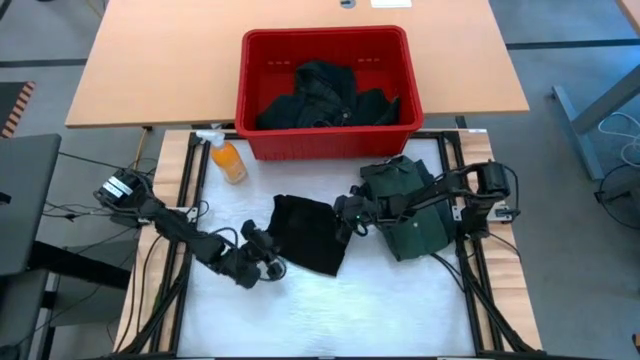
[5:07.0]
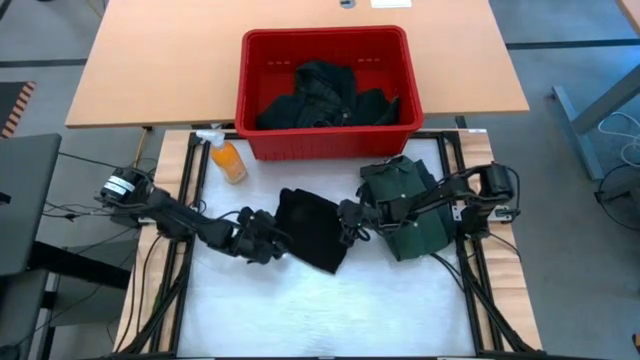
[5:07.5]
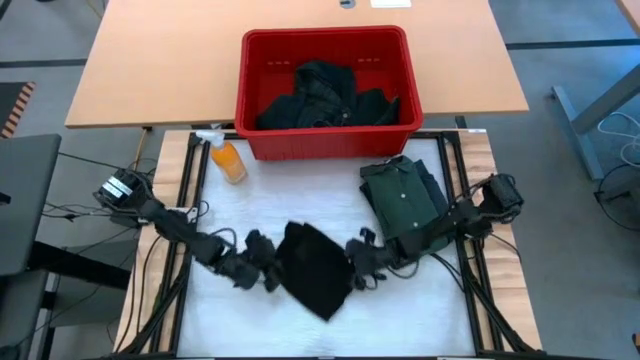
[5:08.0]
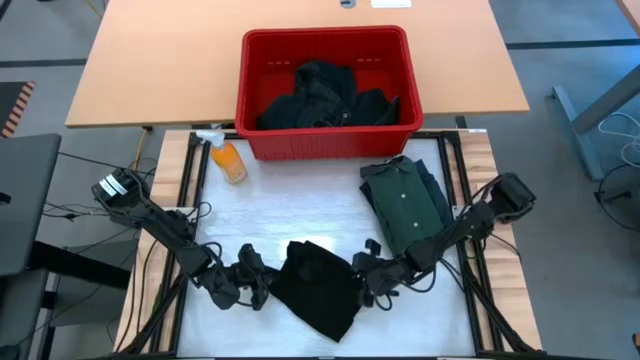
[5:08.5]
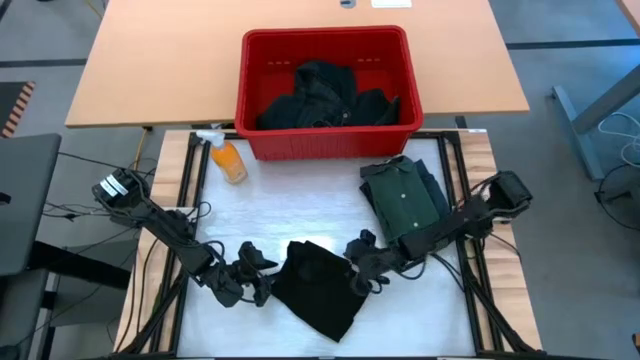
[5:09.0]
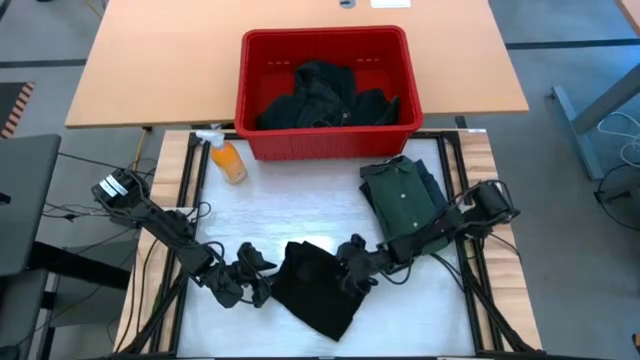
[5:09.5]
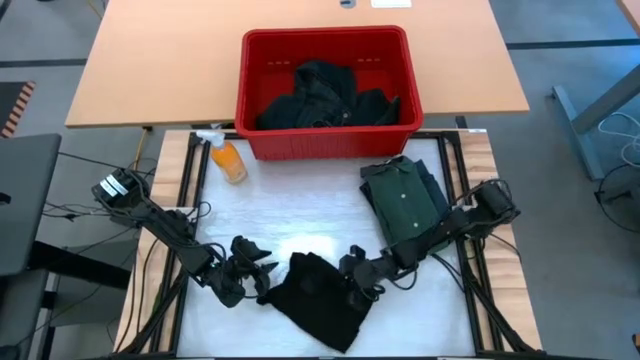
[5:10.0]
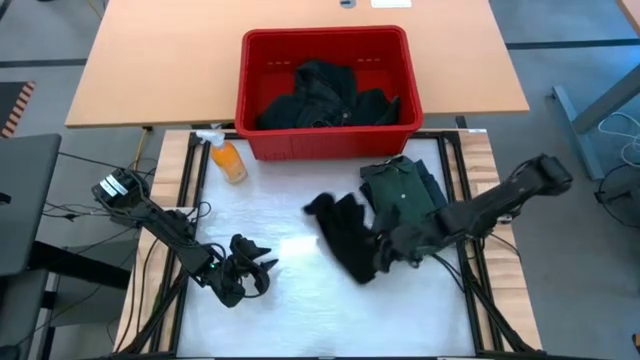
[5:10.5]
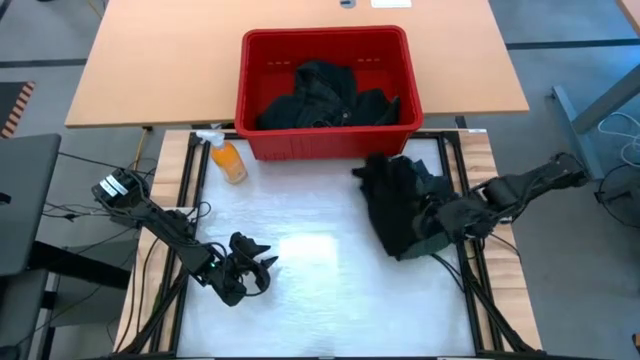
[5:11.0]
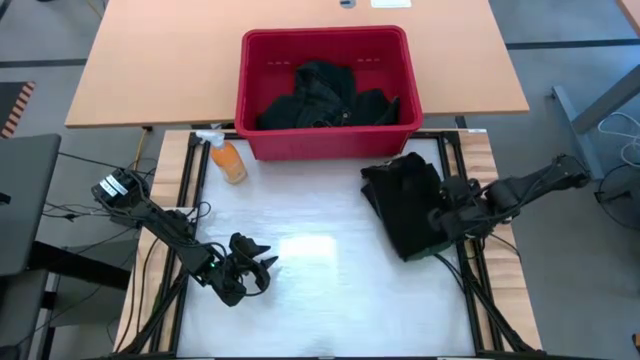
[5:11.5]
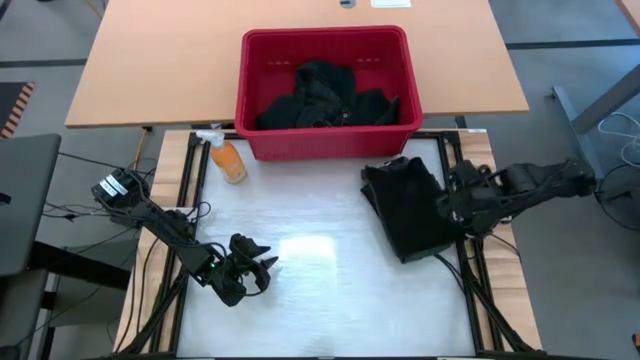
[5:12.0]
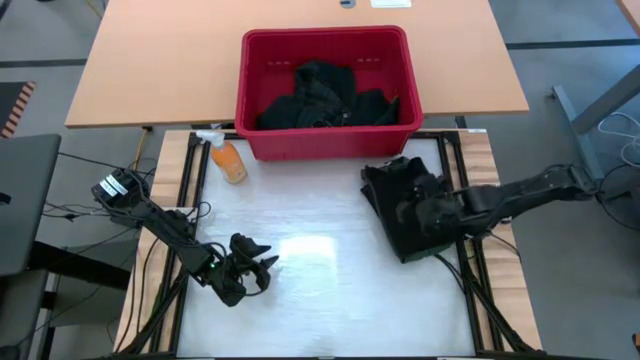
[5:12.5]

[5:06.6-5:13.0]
Task: Fold laundry
Stack the folded black shirt on top of the folded dark green shirt

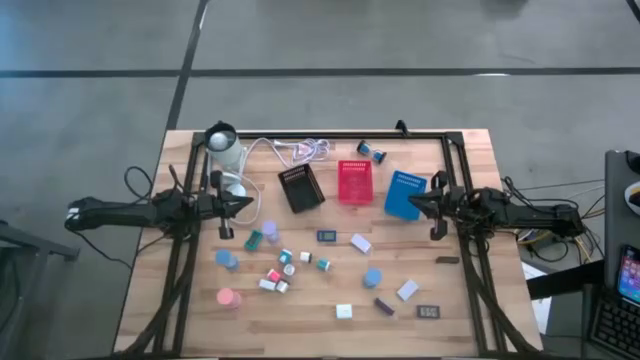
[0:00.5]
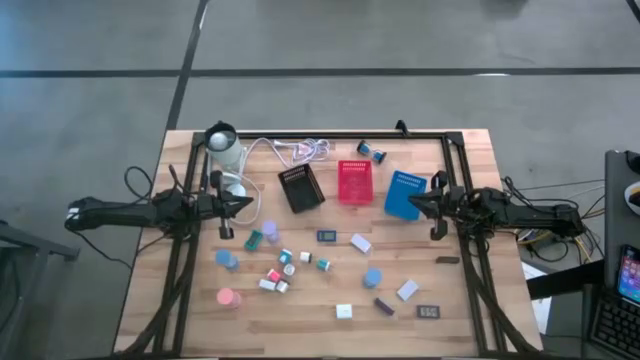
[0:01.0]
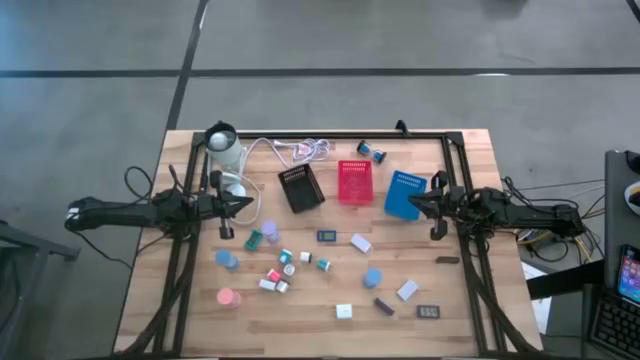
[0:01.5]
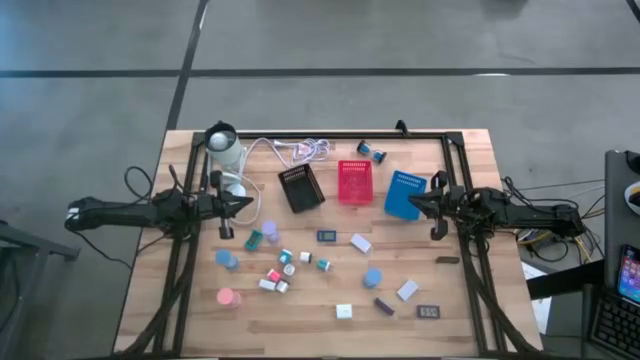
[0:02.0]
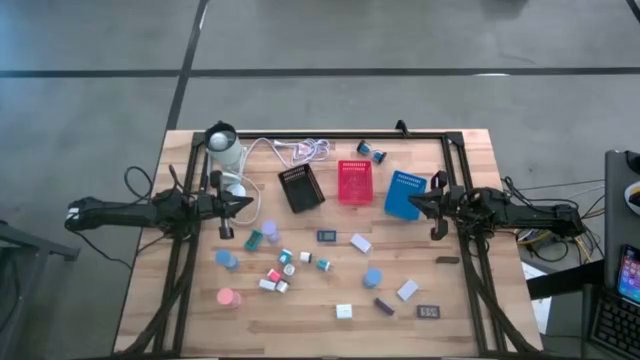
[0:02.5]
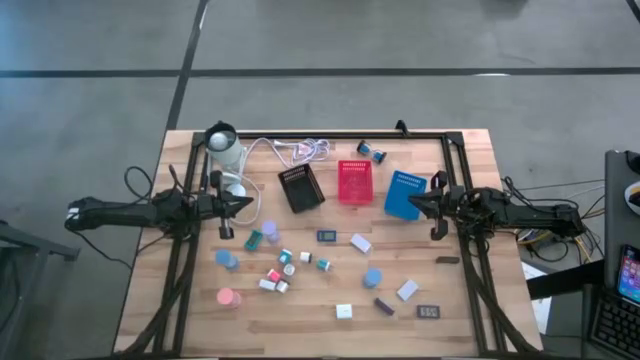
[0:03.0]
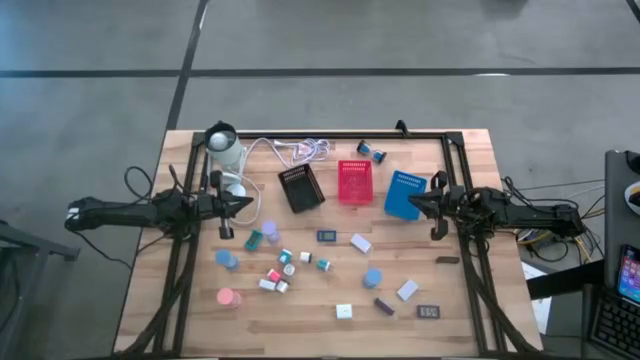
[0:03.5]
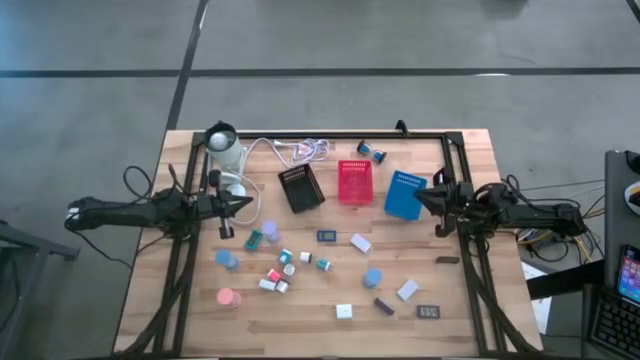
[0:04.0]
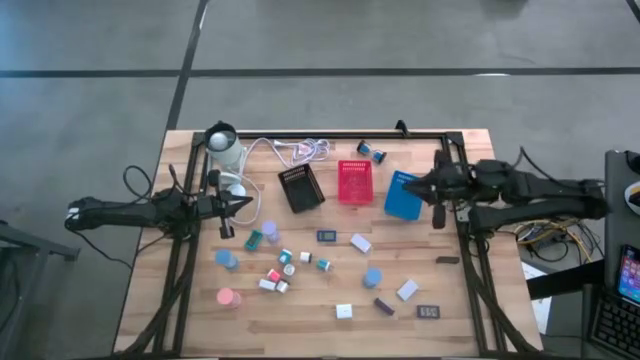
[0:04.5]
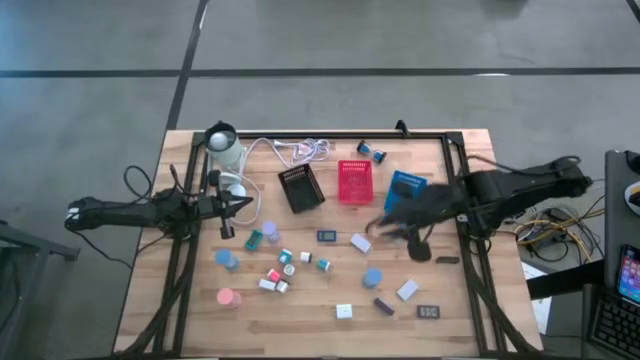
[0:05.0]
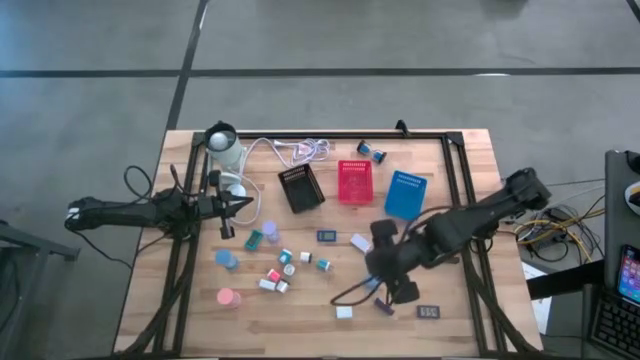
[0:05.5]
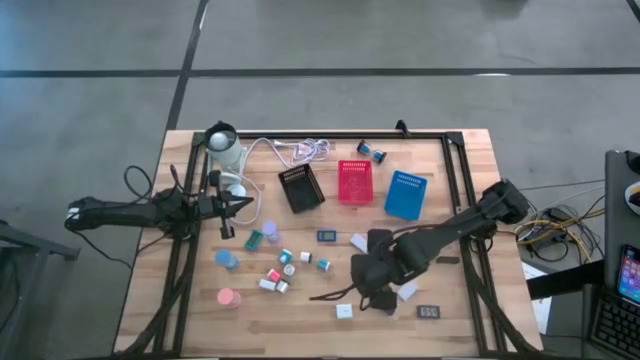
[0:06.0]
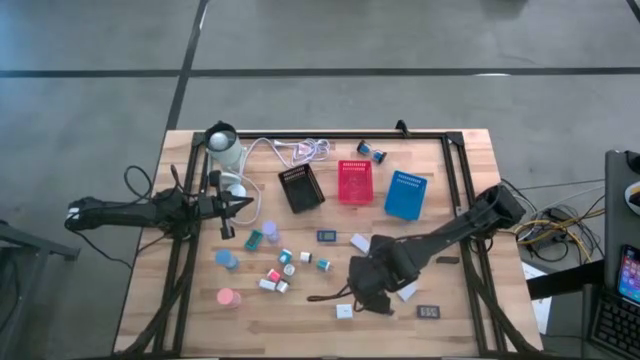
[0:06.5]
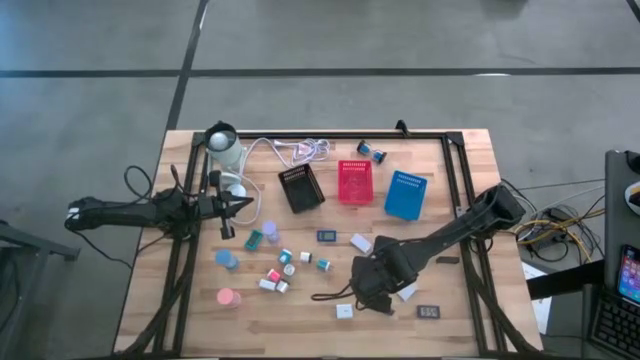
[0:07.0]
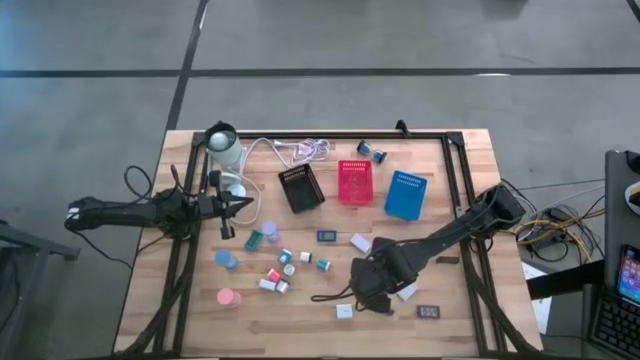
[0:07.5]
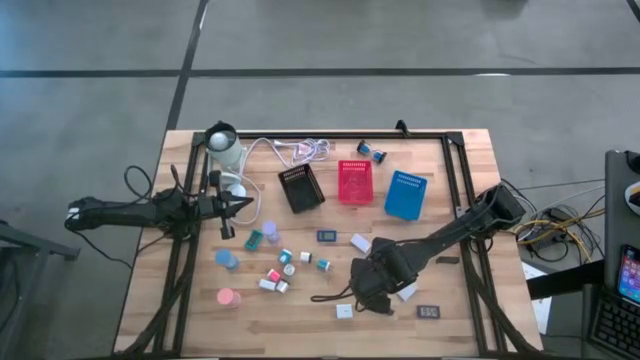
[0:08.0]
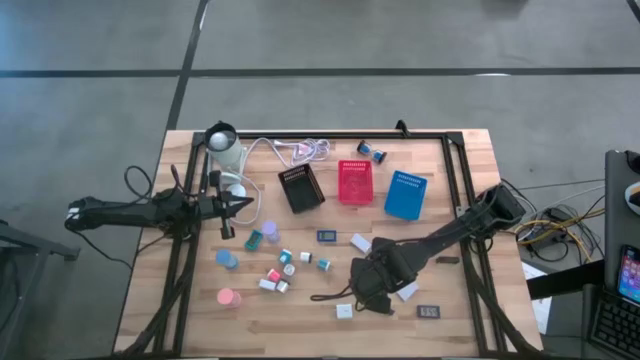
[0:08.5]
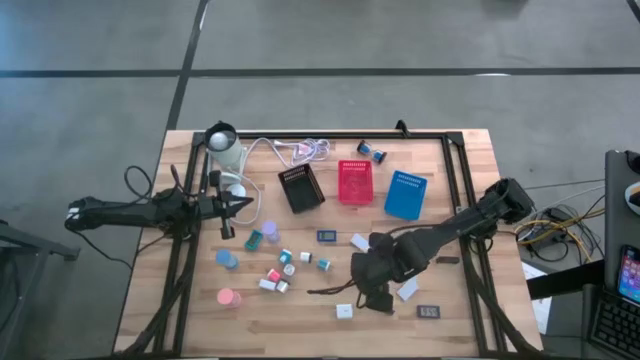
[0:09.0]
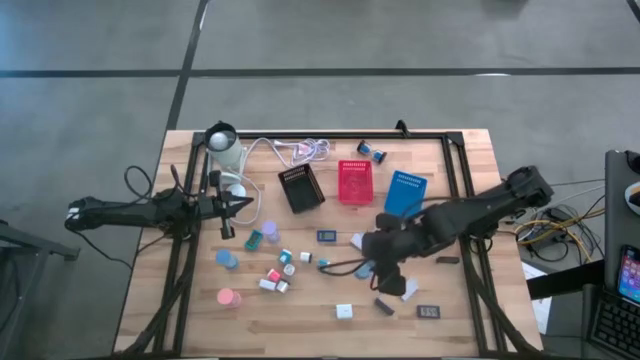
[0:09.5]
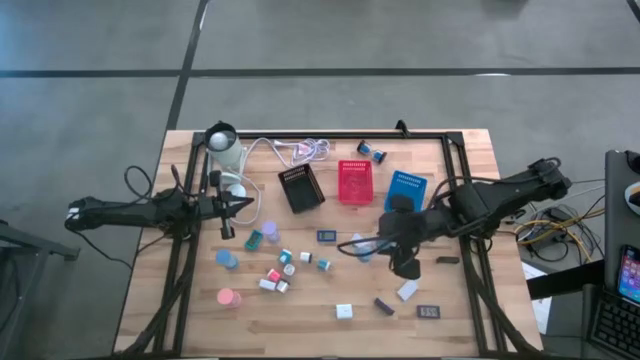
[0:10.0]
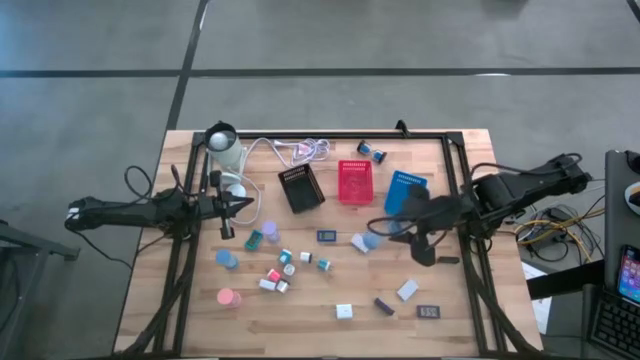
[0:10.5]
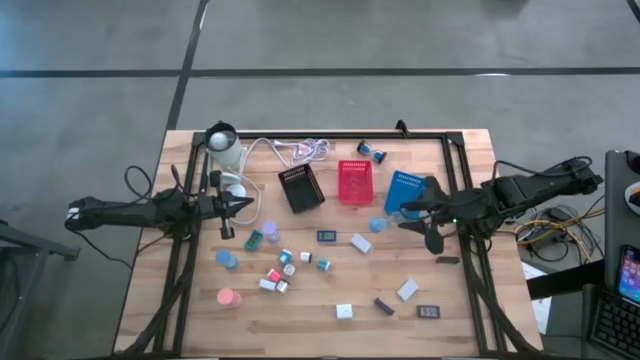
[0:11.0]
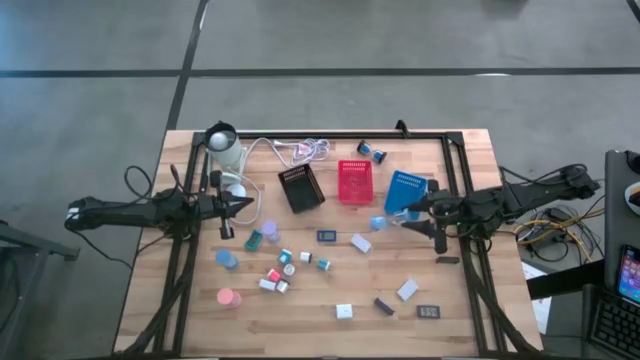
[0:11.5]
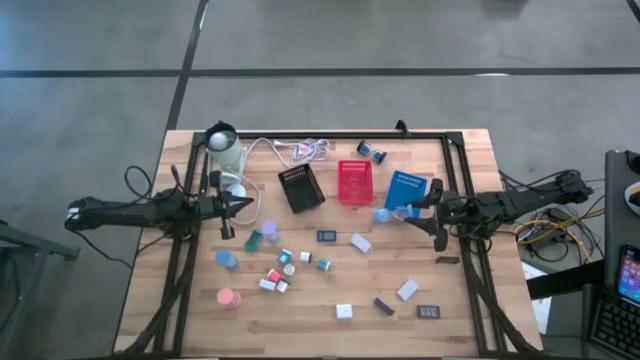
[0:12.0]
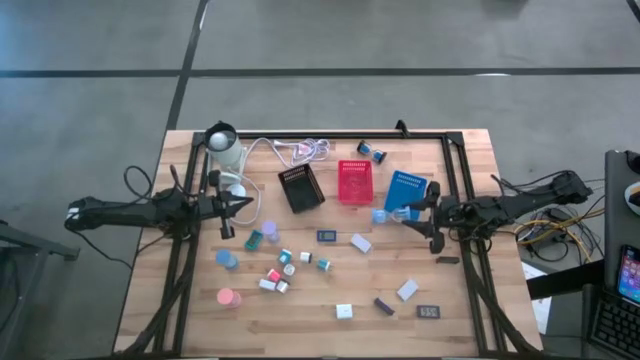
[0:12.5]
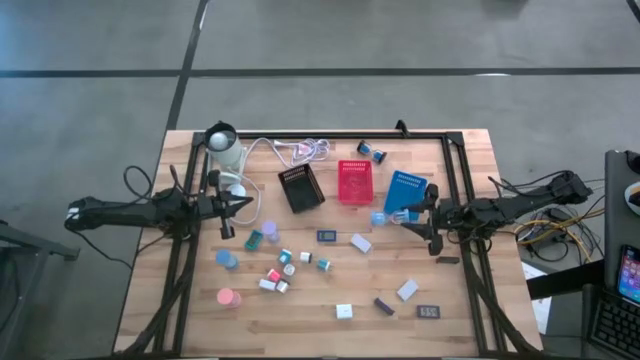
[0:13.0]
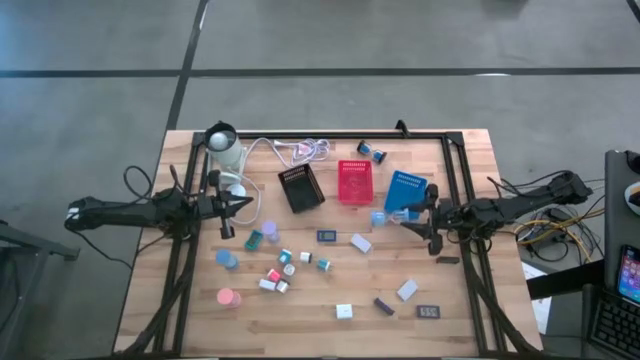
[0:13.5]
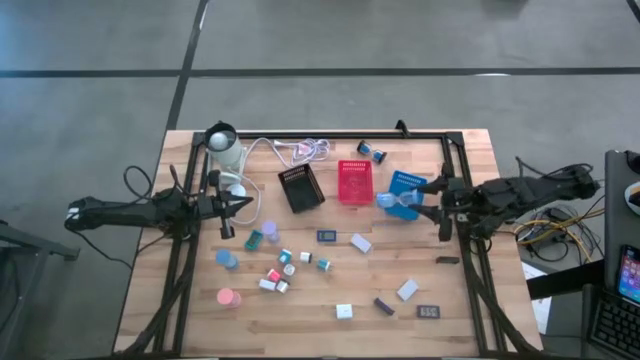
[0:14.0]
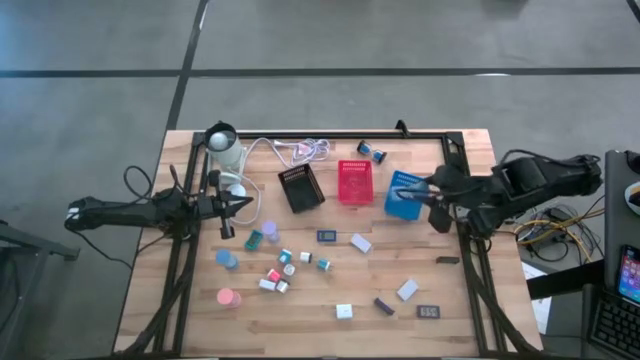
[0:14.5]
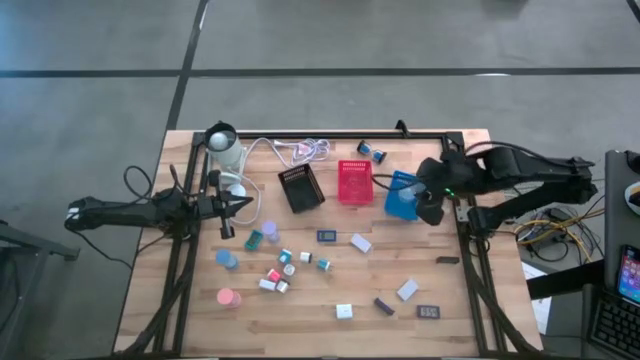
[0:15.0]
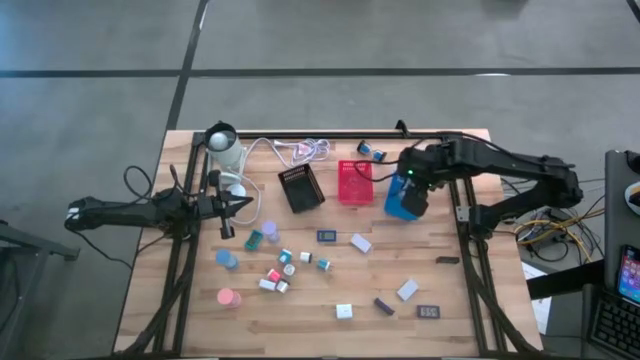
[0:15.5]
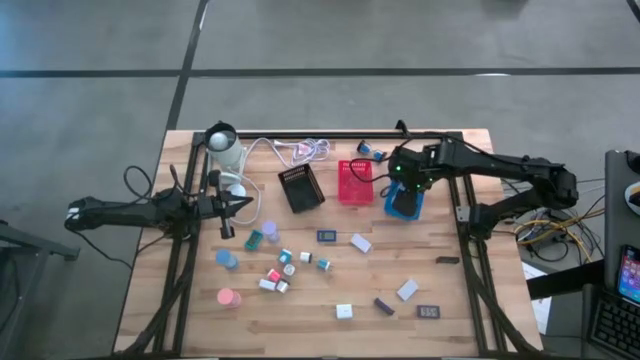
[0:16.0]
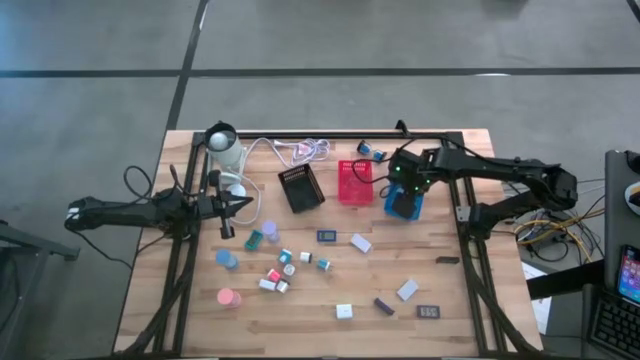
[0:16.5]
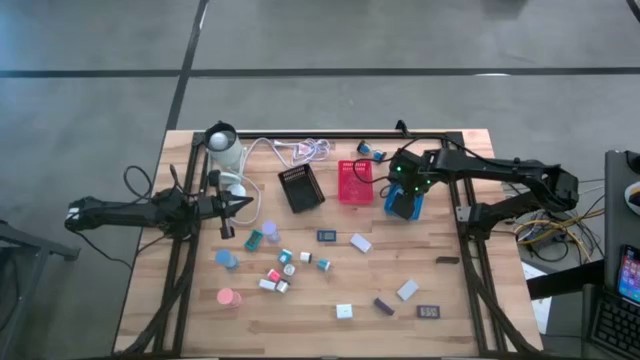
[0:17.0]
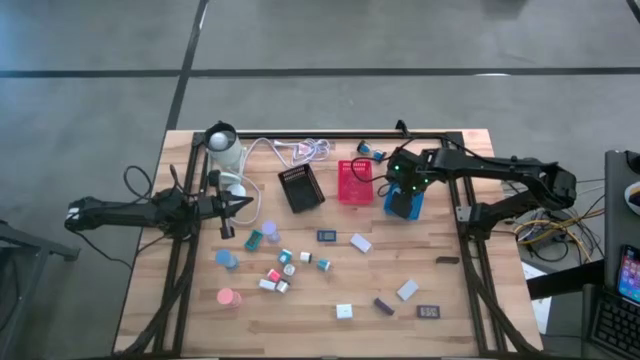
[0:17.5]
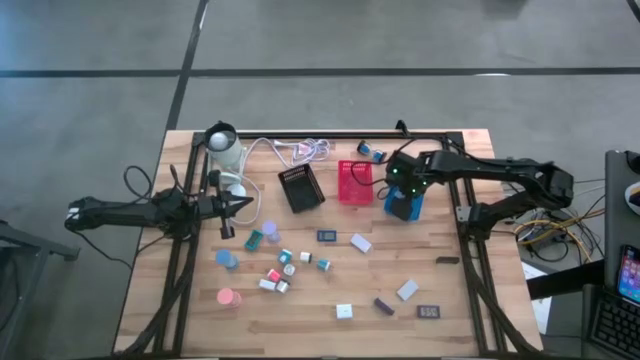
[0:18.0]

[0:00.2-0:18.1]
Task: Pick & Place Office items
Put the bottom light blue hourglass into the blue bin
